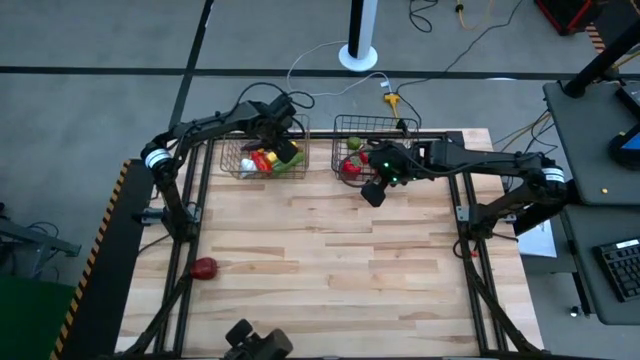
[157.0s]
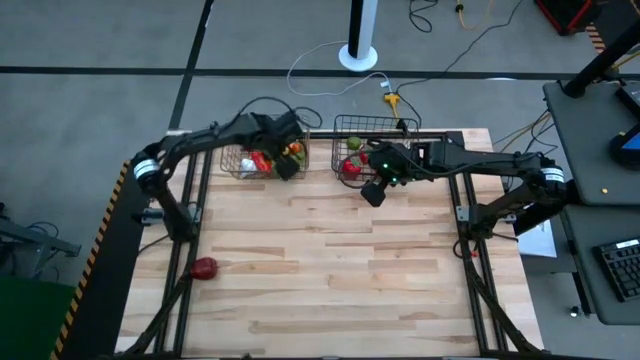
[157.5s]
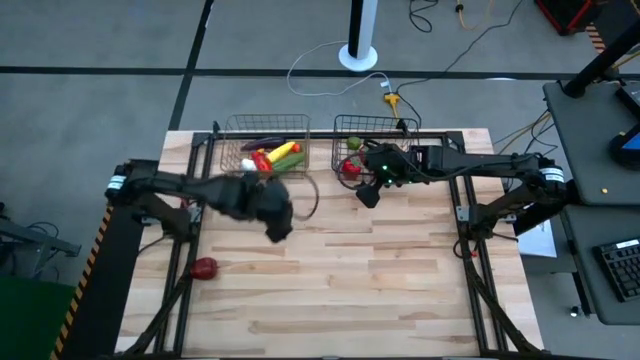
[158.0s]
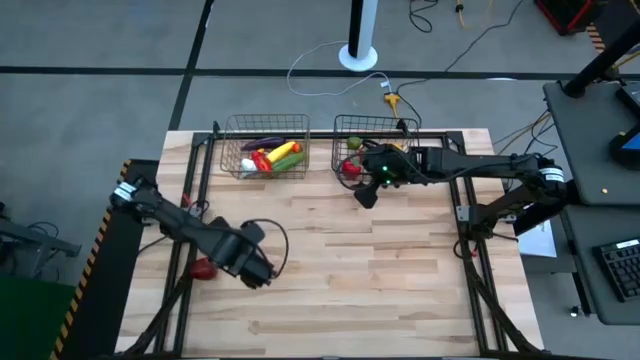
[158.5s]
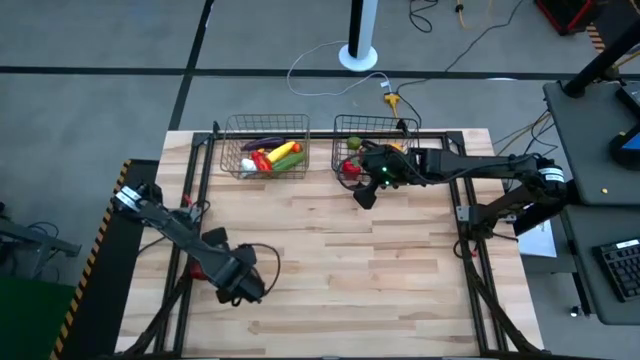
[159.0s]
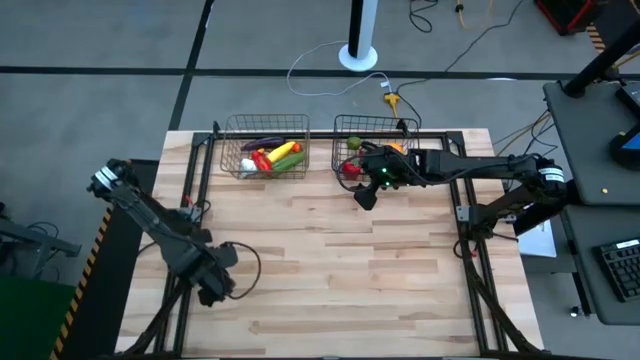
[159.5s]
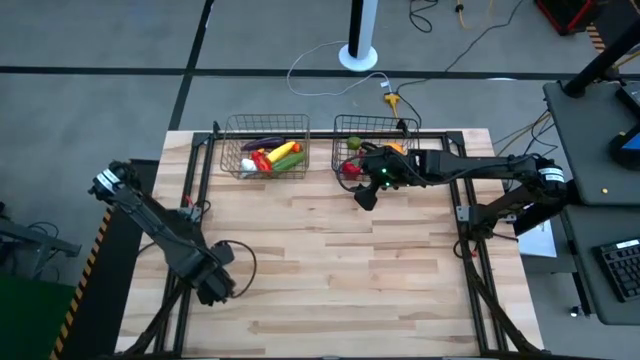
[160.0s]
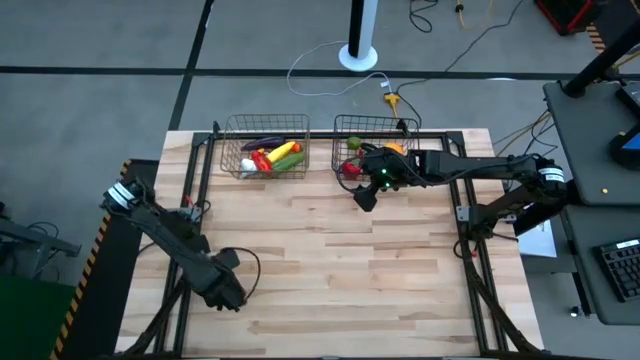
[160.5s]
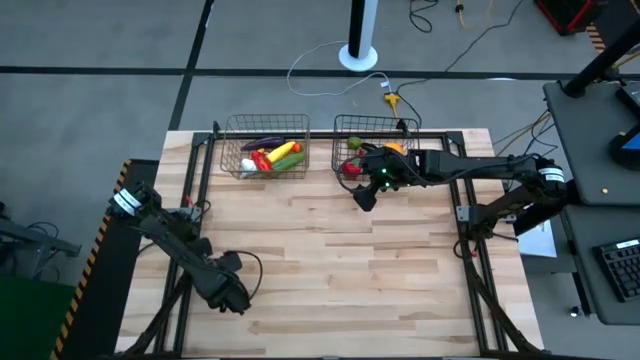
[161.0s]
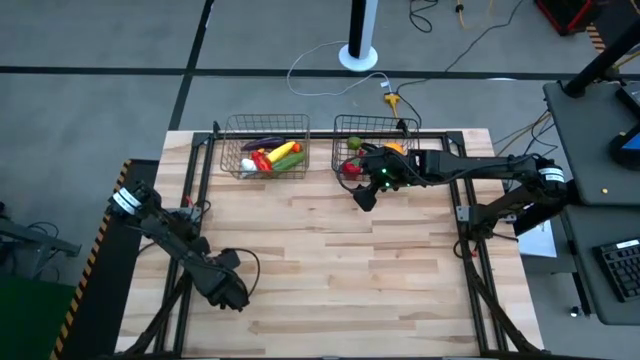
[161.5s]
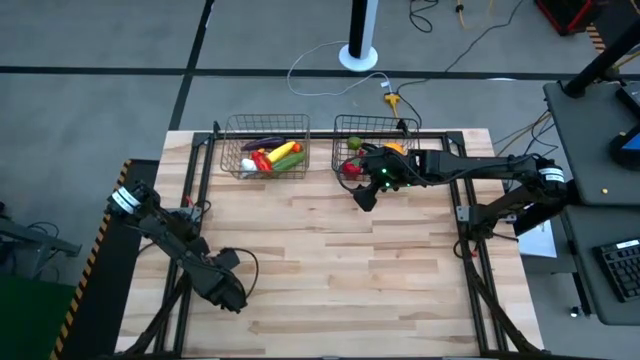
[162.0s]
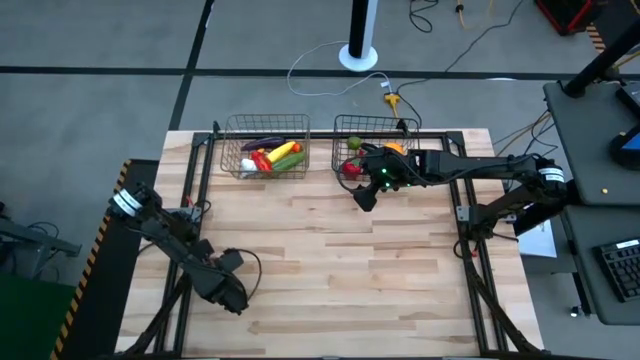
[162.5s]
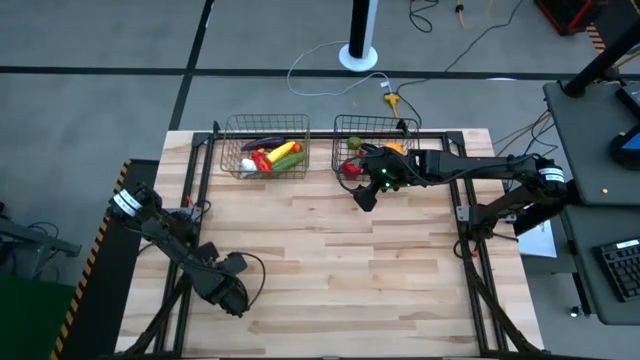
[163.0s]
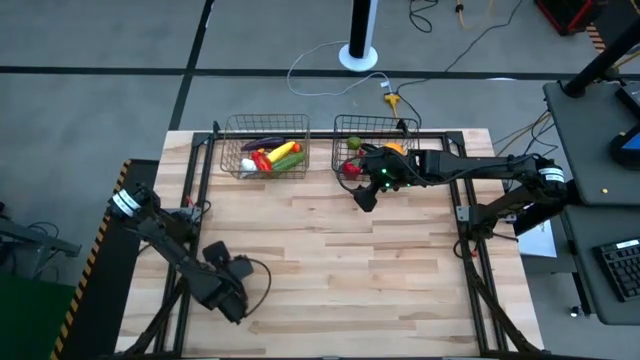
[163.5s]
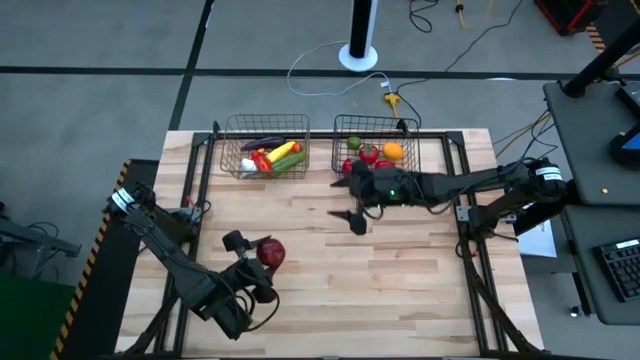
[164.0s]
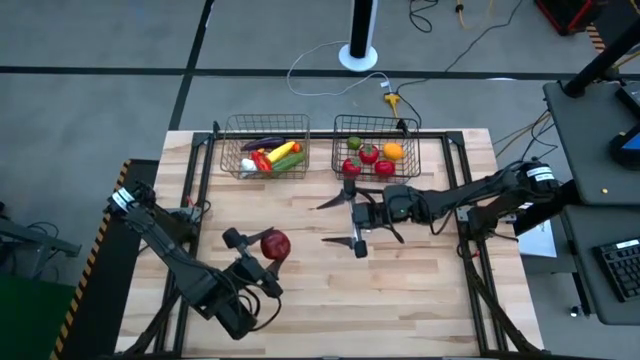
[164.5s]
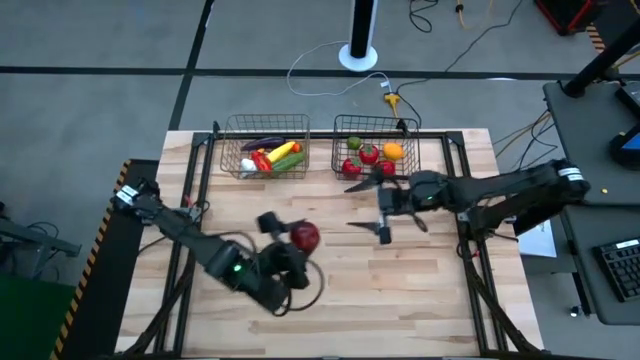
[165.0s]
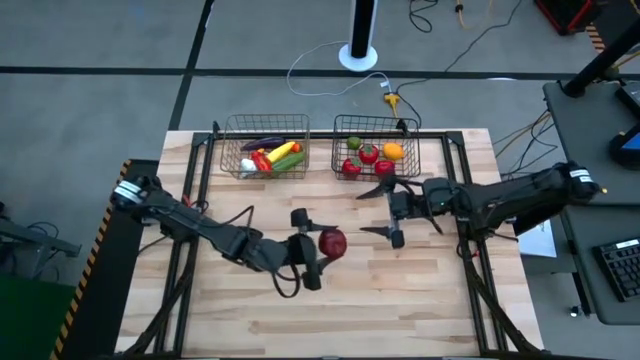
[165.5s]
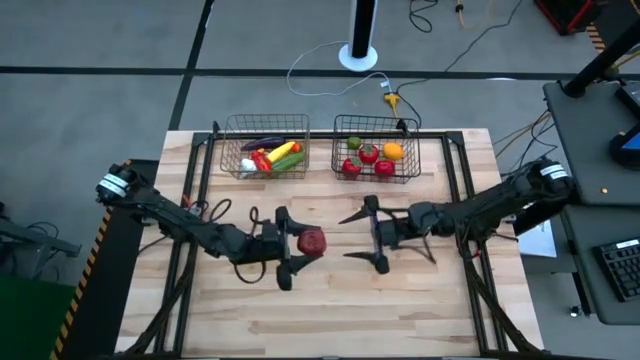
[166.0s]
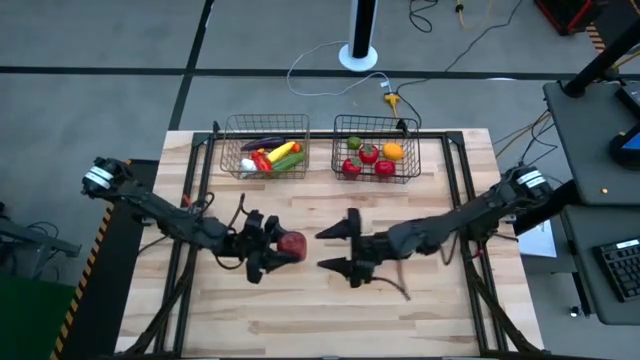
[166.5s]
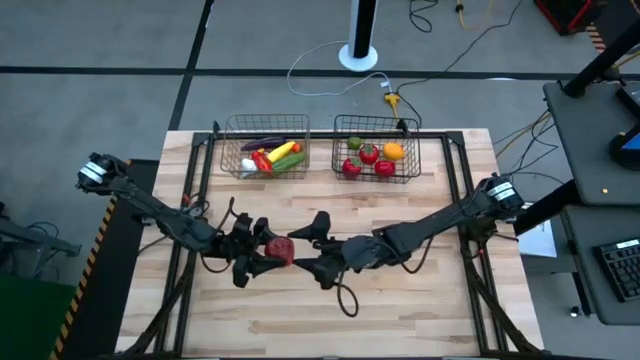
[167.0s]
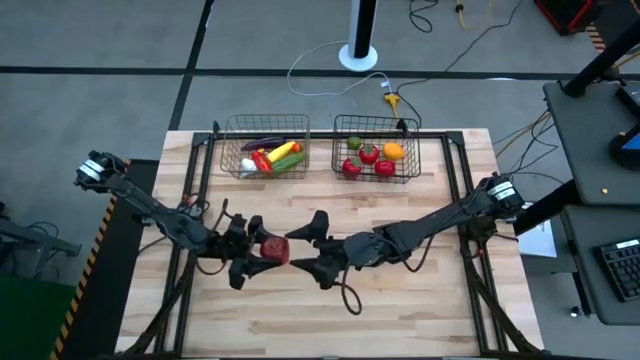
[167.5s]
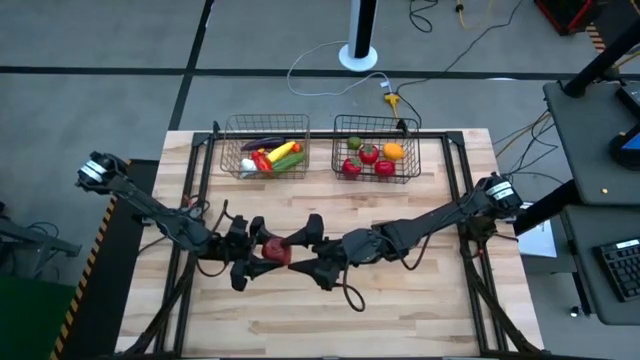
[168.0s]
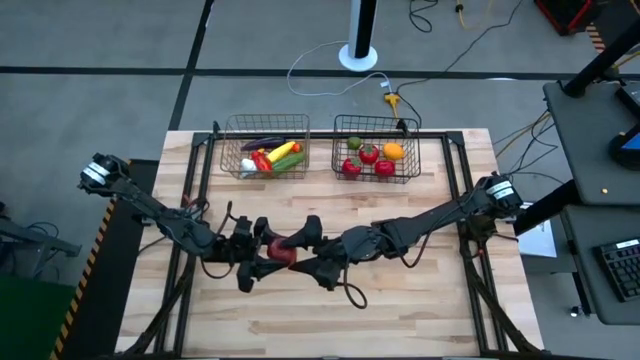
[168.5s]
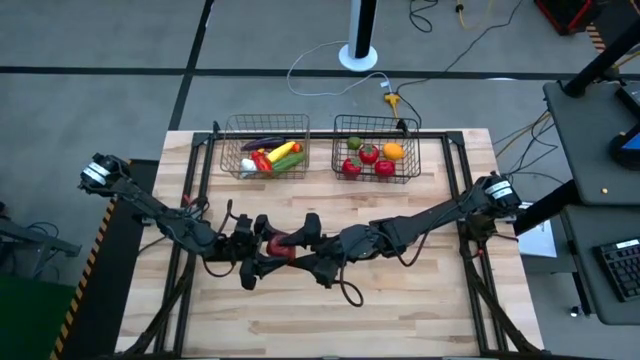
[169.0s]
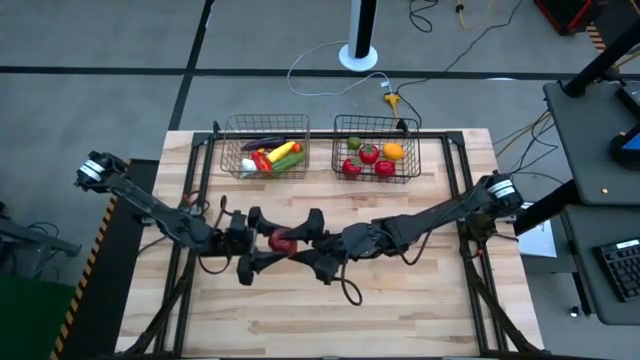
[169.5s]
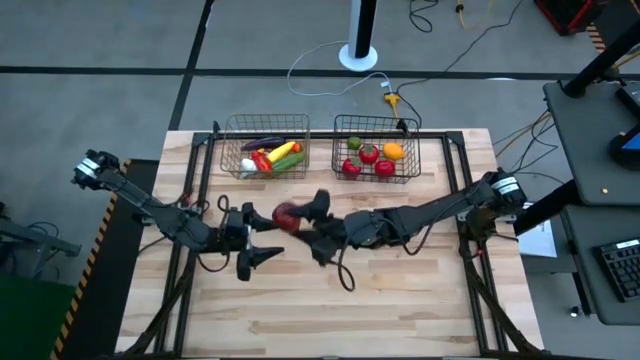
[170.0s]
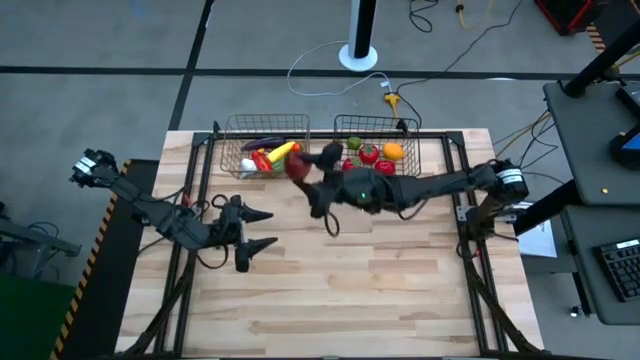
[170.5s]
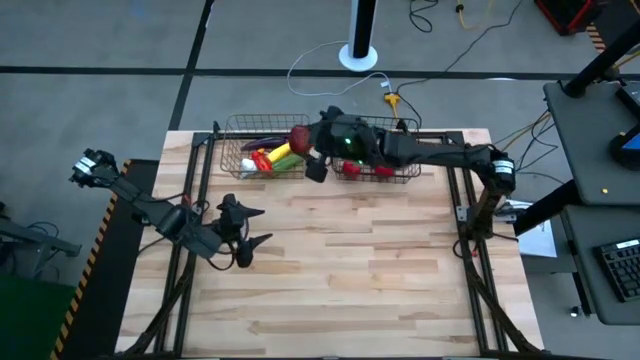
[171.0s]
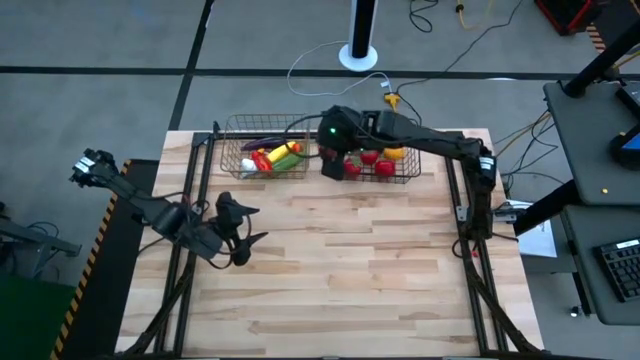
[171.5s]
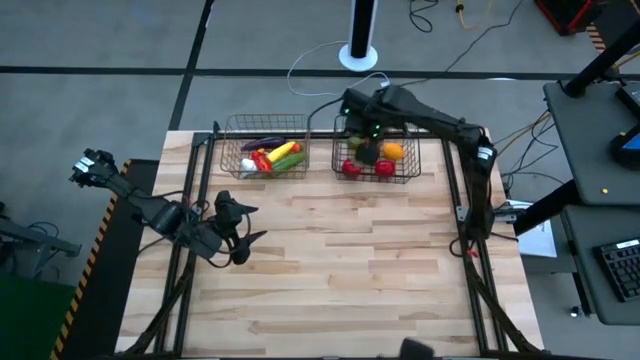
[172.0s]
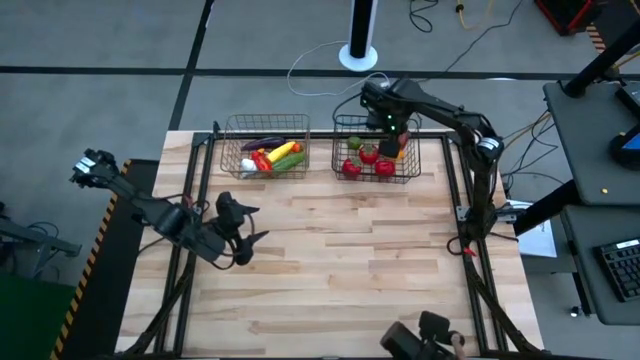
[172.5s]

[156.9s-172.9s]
Task: Sort produce into baskets
Put the red apple into the right wire basket

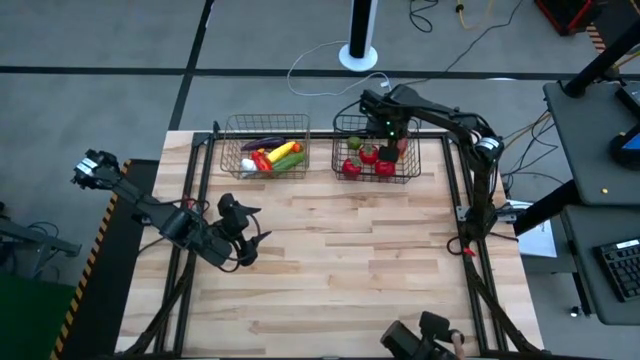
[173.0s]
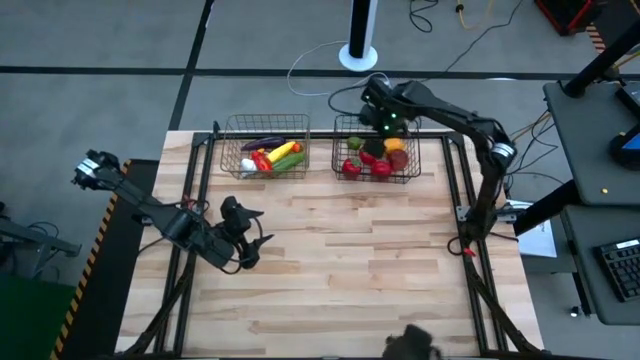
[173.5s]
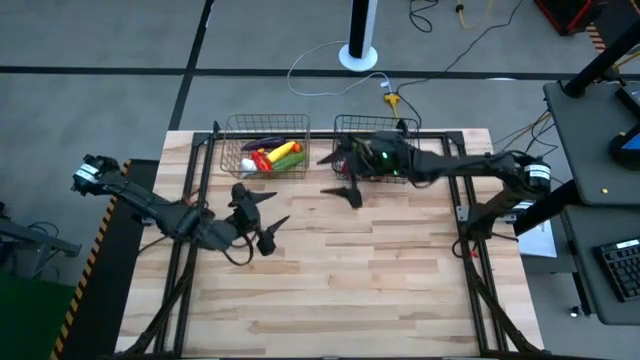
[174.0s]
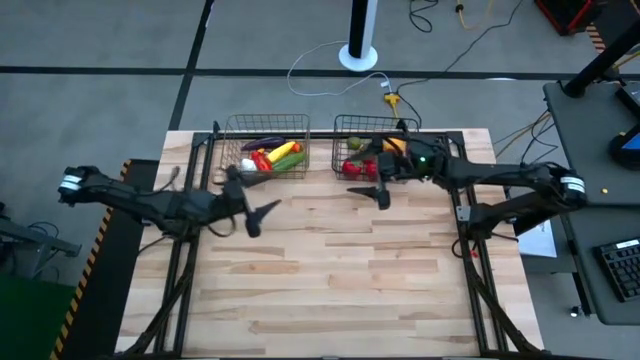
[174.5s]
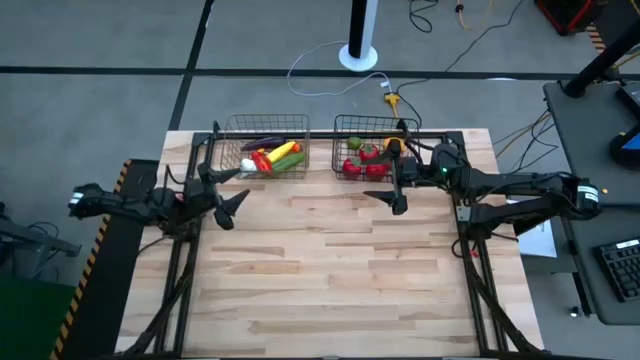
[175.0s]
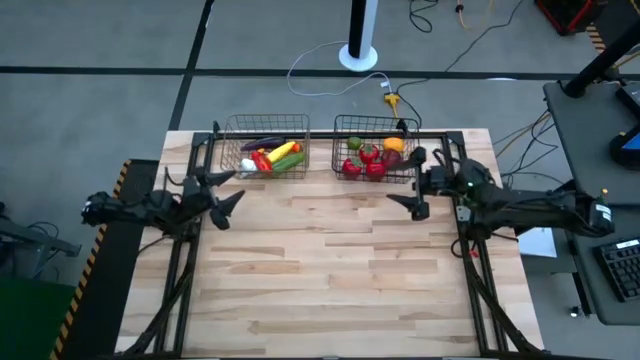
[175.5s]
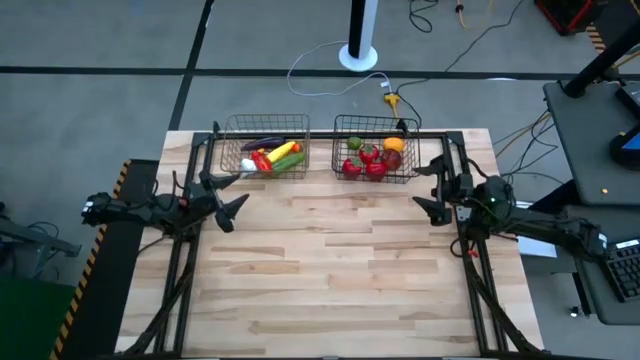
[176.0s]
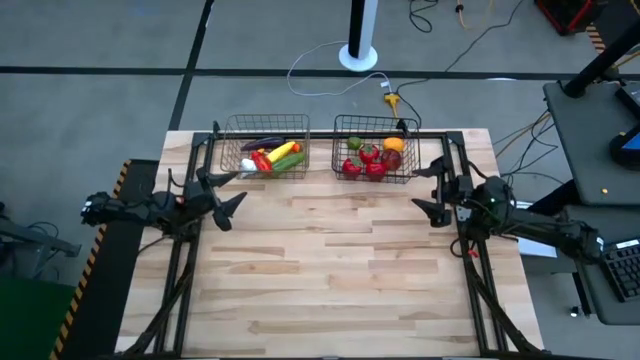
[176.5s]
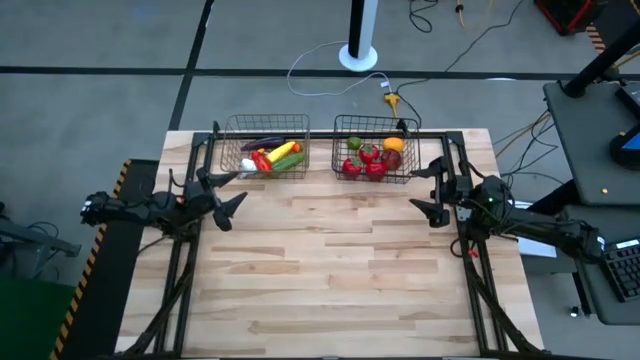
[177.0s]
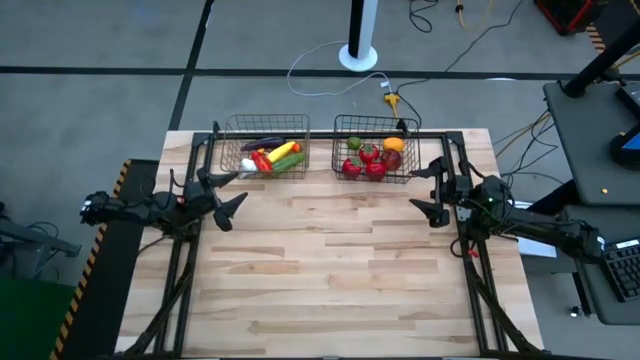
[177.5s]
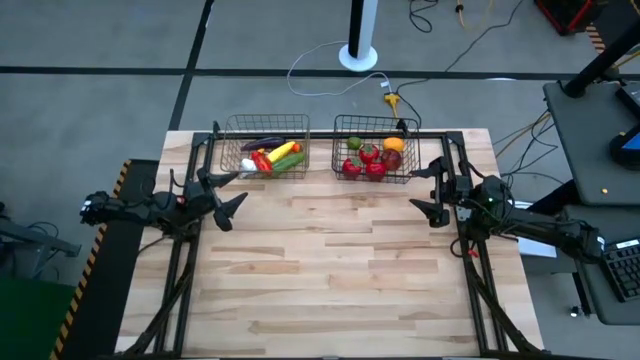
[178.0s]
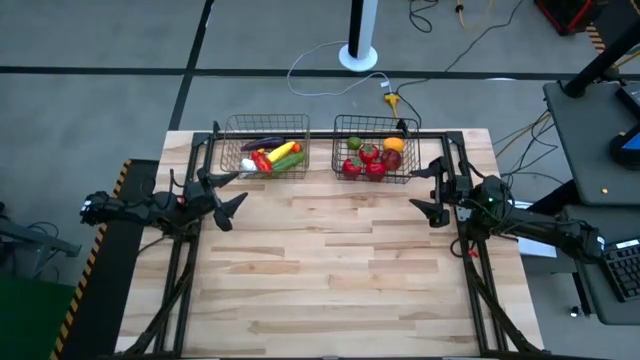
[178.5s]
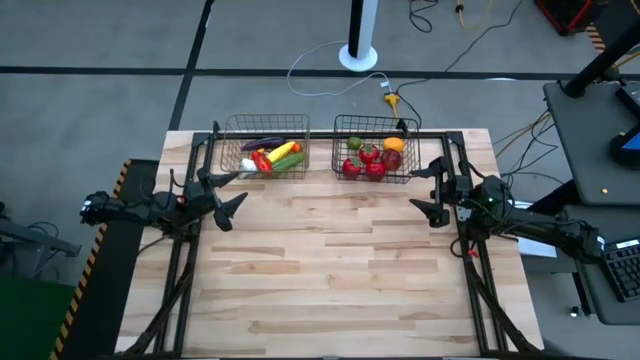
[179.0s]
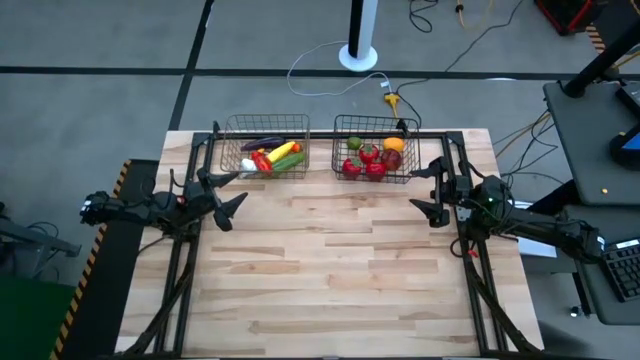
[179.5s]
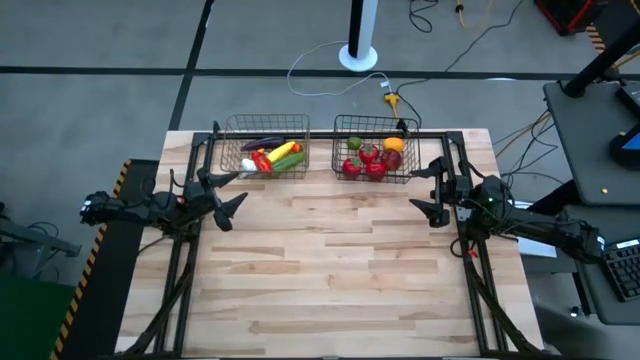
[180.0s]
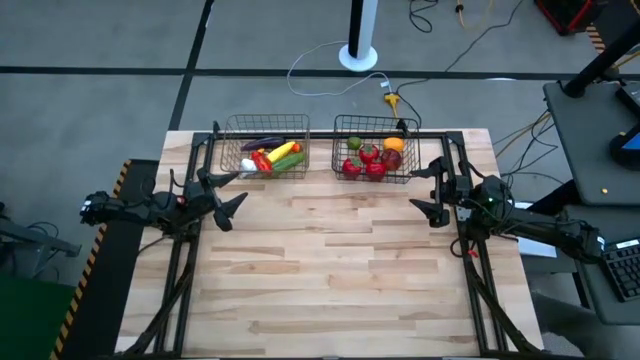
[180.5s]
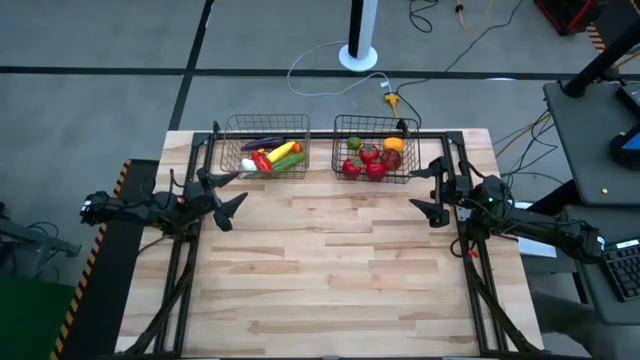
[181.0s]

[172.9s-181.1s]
Return to Home Position
